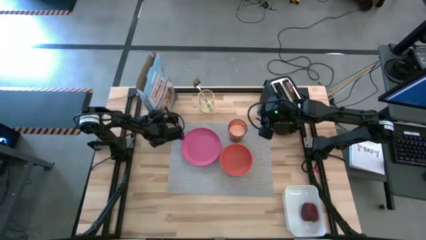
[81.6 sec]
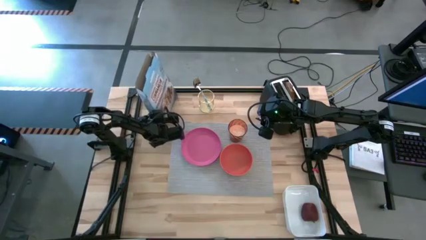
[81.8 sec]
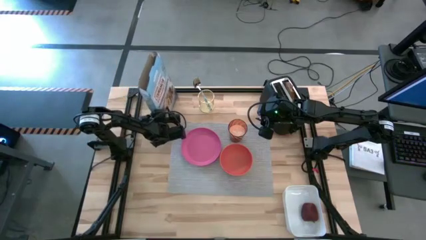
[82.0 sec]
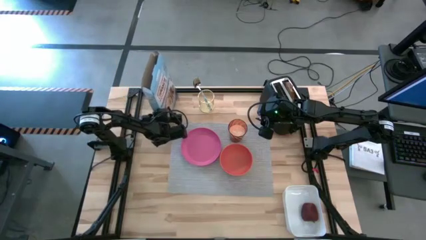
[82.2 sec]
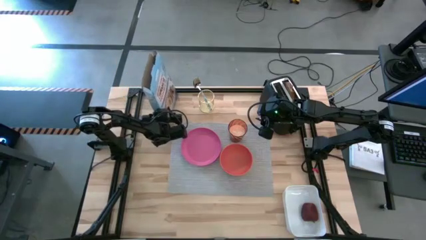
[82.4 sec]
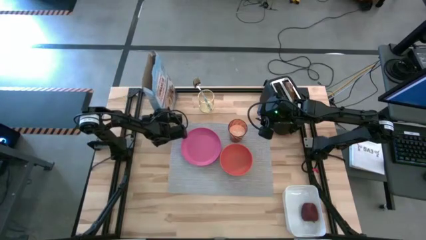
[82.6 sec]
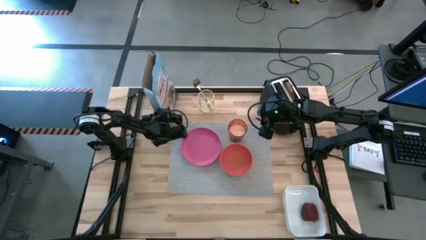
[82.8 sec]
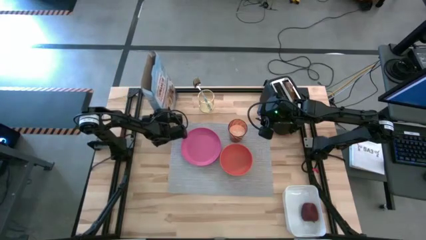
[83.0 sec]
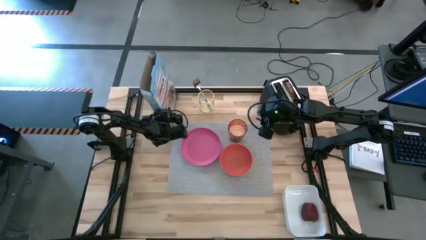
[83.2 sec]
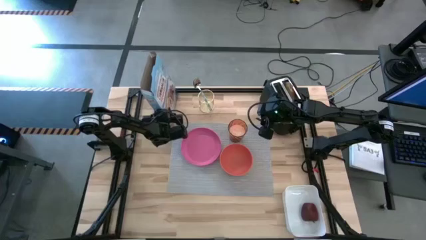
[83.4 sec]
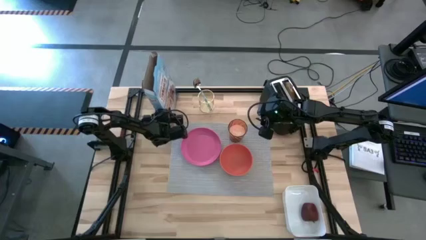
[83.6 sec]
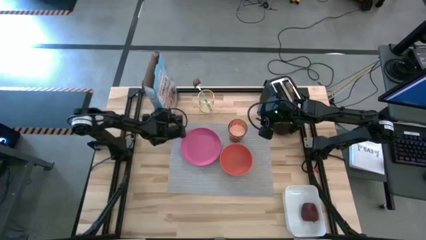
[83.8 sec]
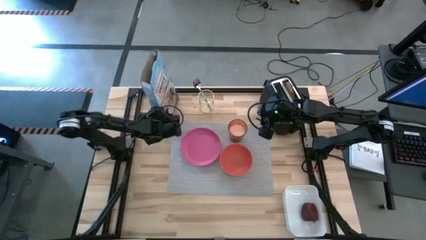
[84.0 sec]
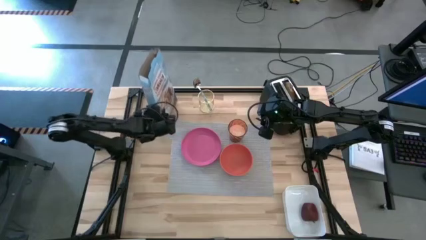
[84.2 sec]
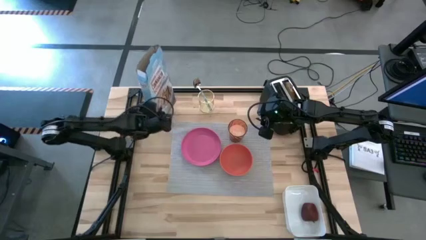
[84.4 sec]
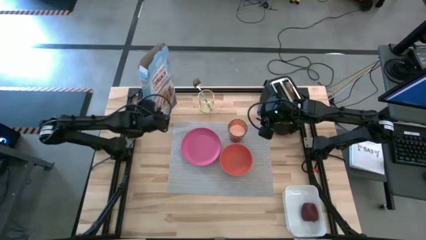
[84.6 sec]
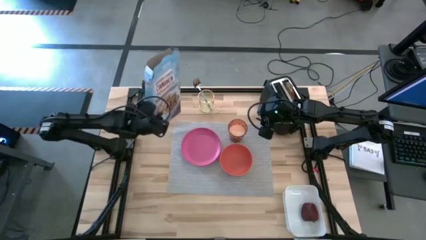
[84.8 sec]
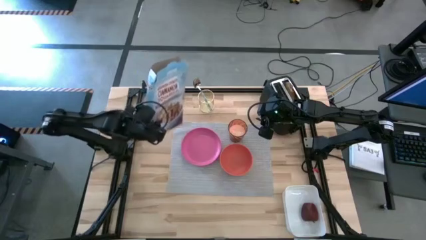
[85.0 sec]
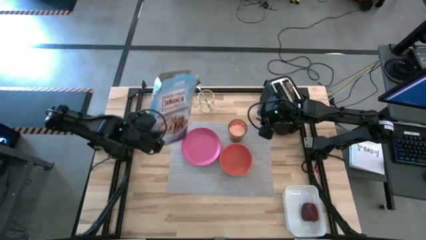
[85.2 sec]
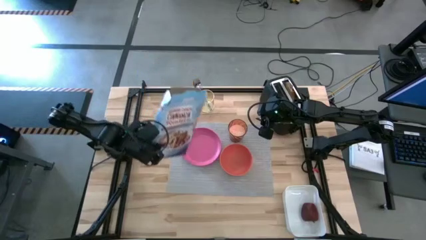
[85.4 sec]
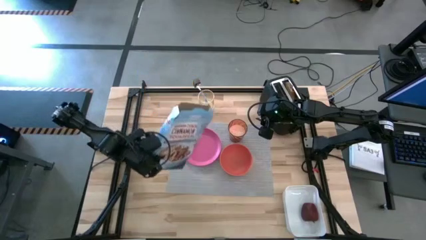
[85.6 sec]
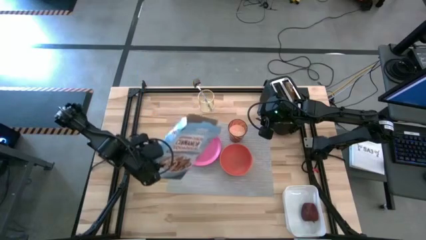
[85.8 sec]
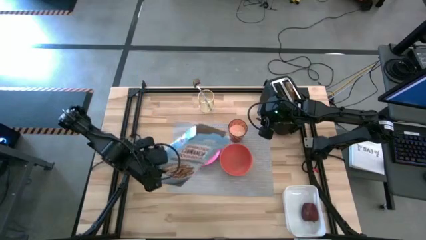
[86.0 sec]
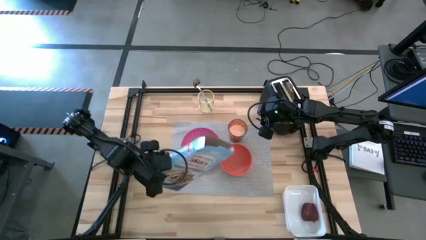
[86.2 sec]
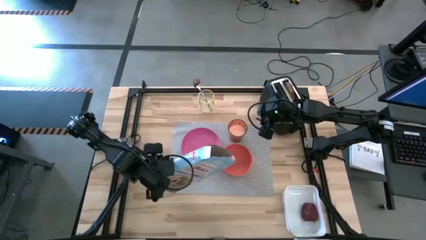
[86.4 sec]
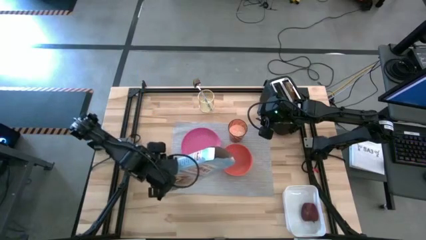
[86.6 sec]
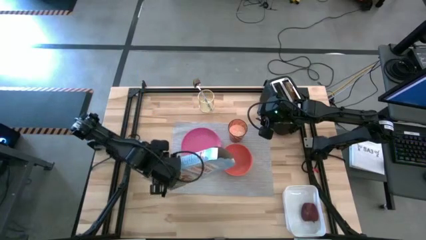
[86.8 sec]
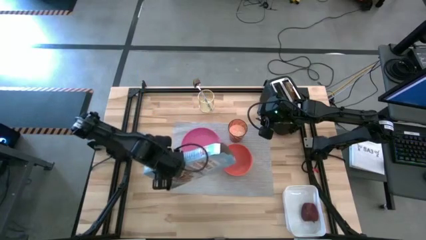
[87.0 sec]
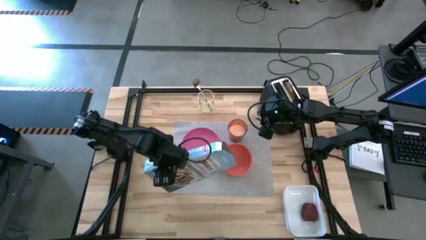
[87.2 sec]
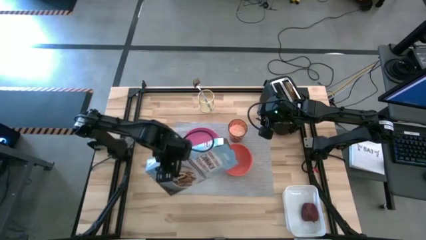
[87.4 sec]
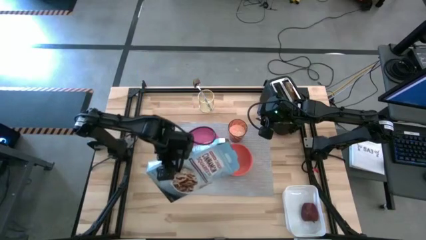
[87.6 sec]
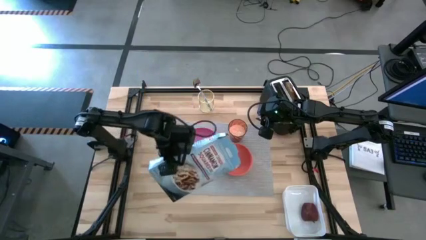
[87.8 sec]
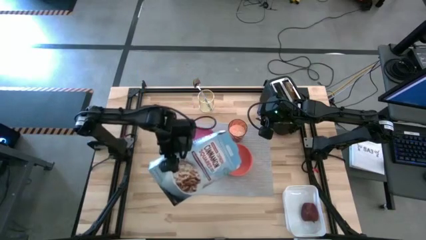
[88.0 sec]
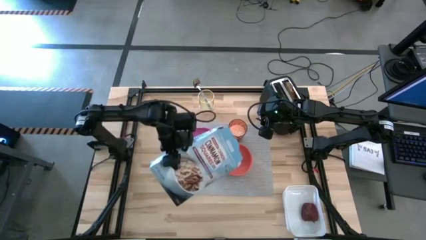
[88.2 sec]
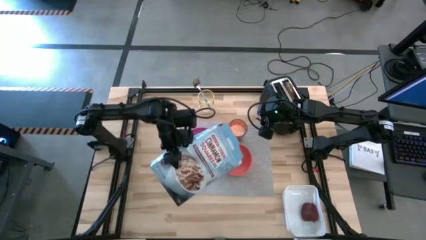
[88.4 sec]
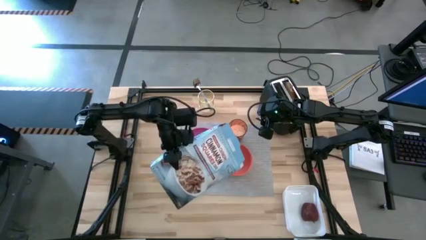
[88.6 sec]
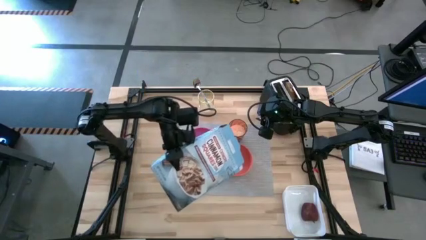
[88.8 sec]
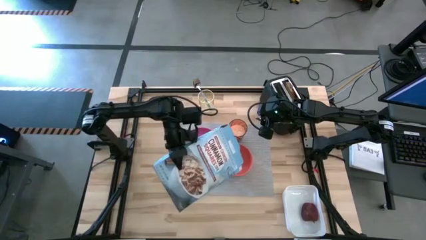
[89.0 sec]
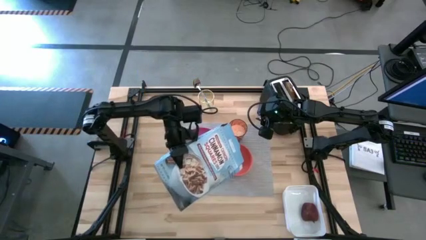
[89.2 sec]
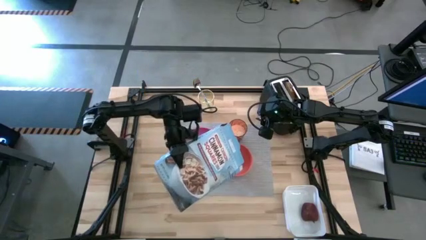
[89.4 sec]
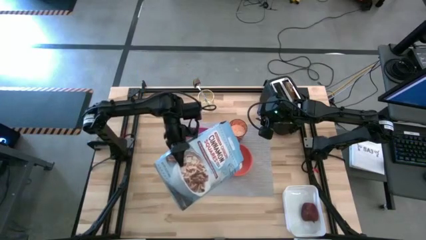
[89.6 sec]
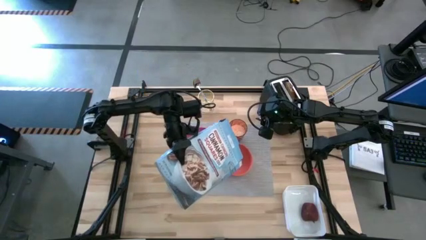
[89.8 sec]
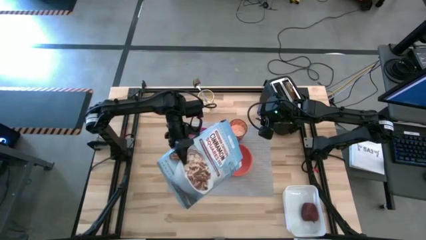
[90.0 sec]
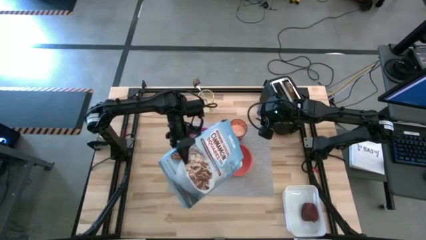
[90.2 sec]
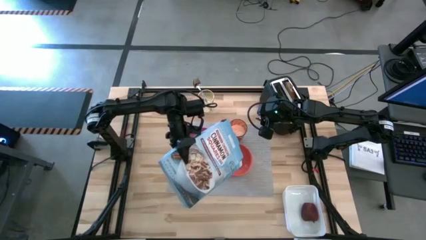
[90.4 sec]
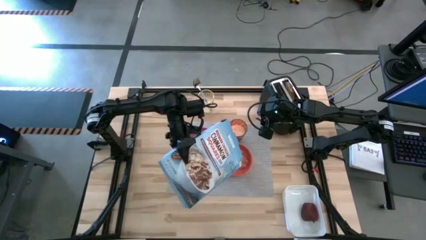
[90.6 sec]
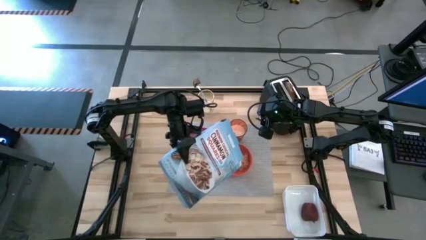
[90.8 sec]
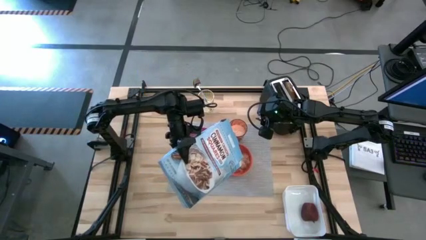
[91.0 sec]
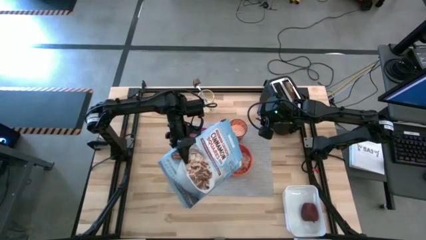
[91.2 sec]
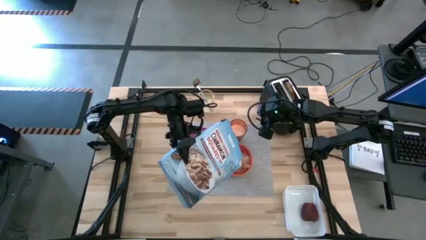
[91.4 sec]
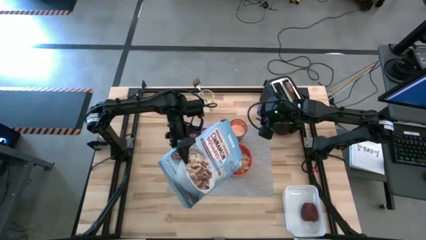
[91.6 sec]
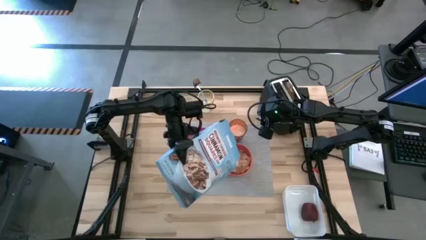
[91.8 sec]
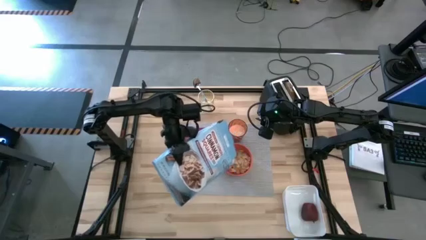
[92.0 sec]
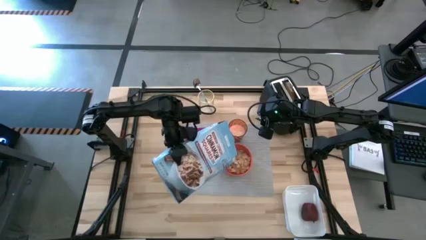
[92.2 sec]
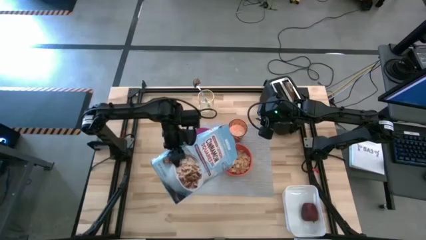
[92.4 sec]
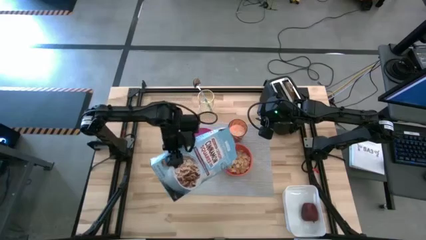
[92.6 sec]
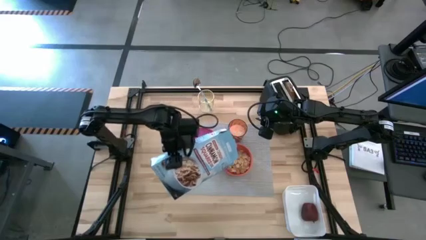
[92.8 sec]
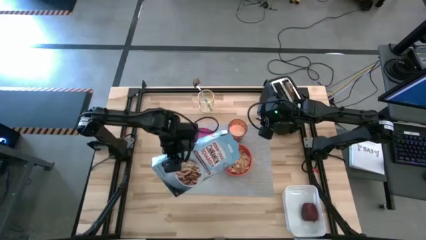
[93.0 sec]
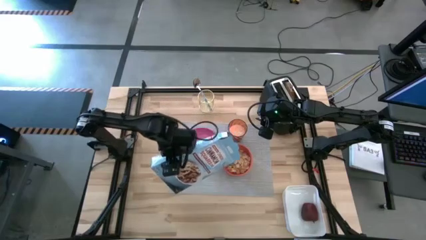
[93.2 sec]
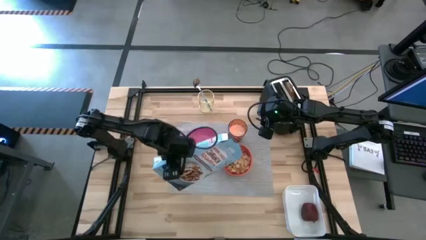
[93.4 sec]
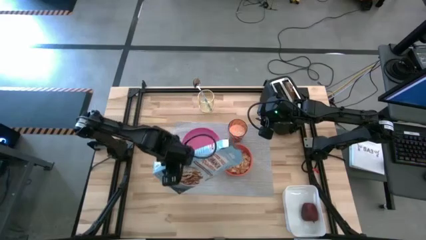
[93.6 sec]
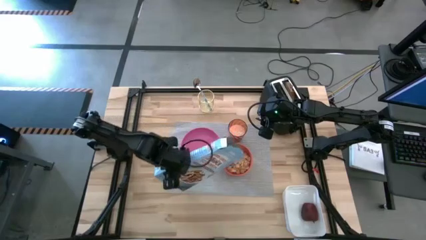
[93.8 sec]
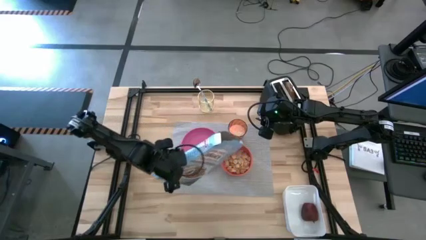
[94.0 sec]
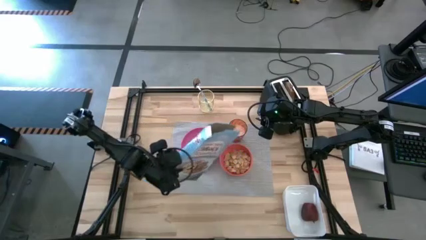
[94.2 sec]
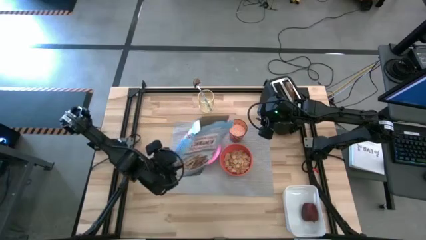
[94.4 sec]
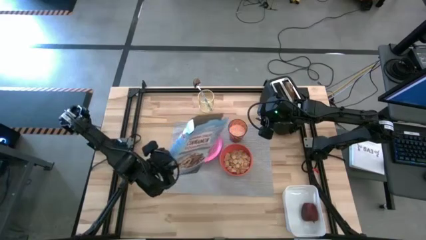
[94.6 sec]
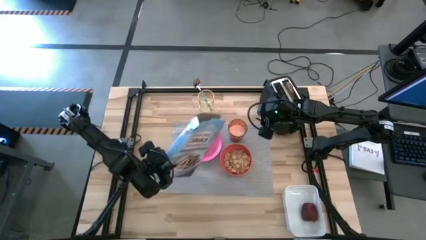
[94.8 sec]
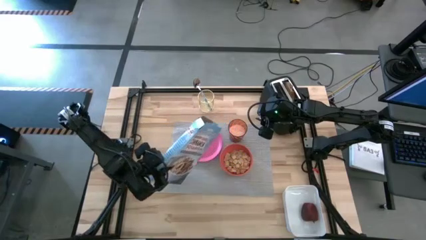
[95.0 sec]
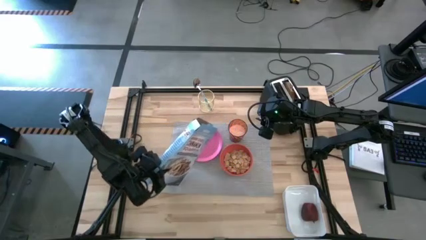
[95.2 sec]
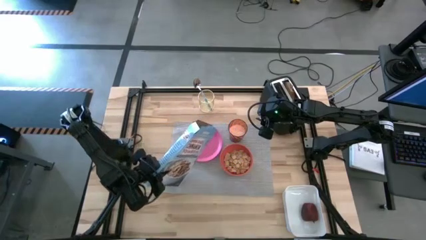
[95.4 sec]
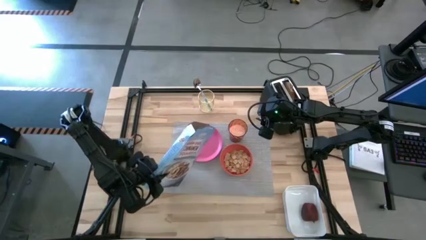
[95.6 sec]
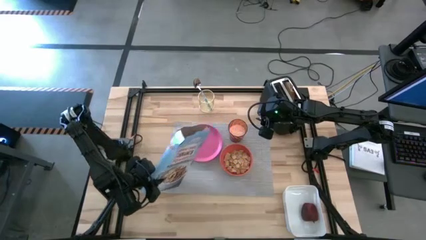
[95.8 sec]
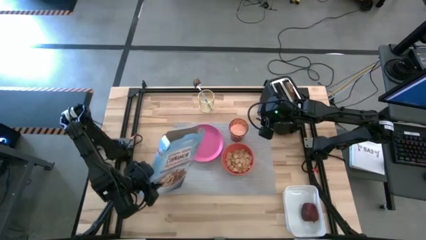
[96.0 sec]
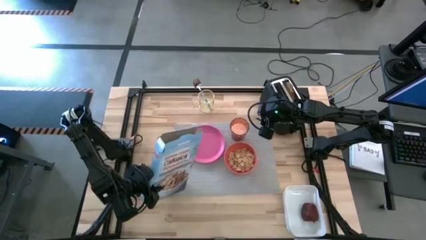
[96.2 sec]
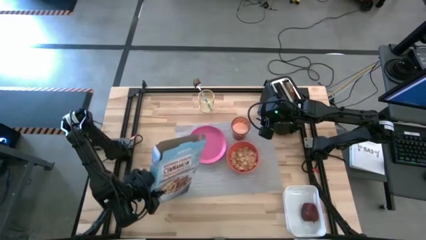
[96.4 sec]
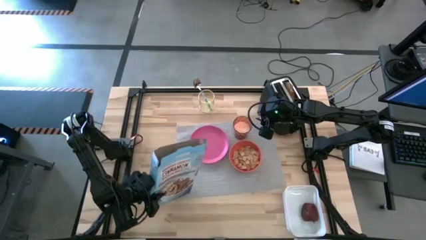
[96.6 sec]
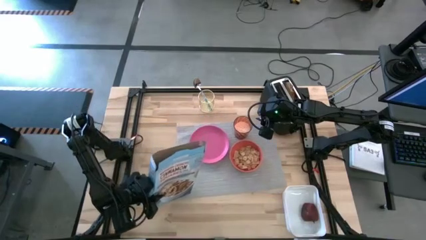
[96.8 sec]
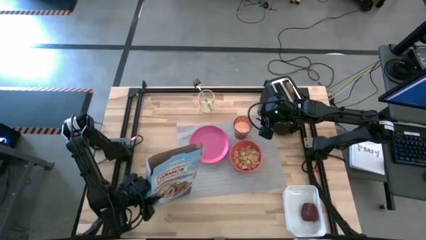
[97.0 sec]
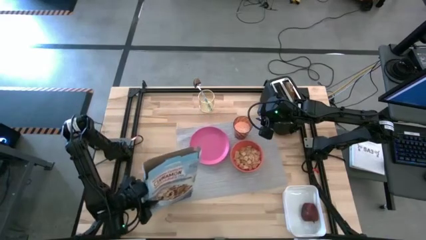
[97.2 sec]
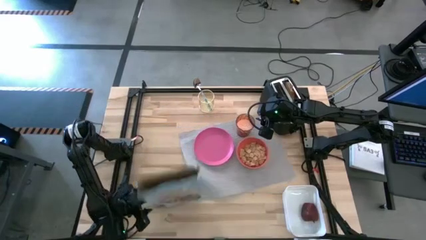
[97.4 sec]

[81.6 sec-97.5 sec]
Task: Arrange a breakfast setting
Pour the cereals from the cereal box in the orange bowl

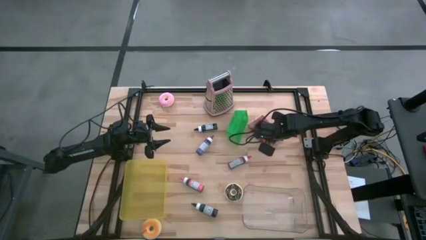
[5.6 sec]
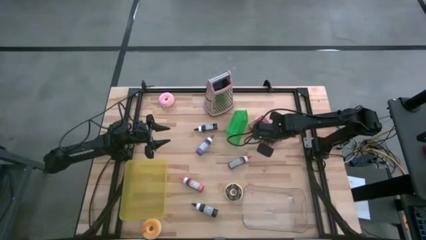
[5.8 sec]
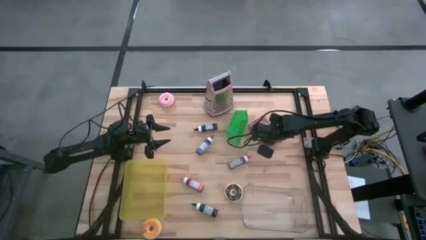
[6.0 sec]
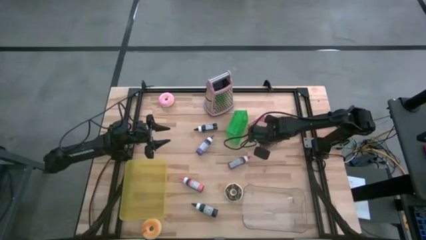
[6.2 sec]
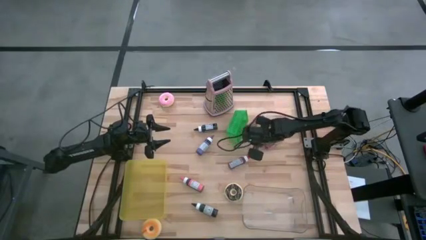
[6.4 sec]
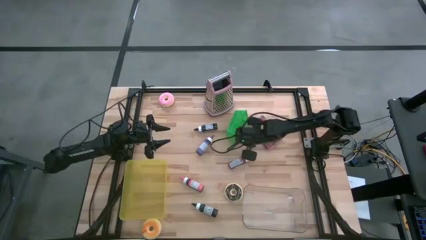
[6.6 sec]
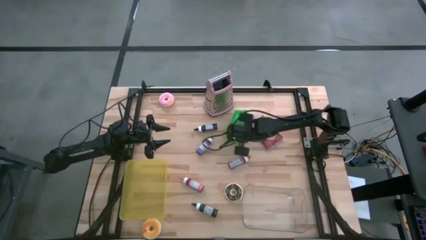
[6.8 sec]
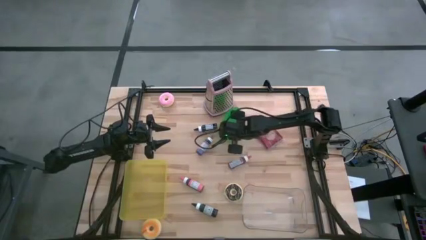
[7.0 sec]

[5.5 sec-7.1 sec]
Task: Pick & Place Food Item
Adjust the green bin on the table
